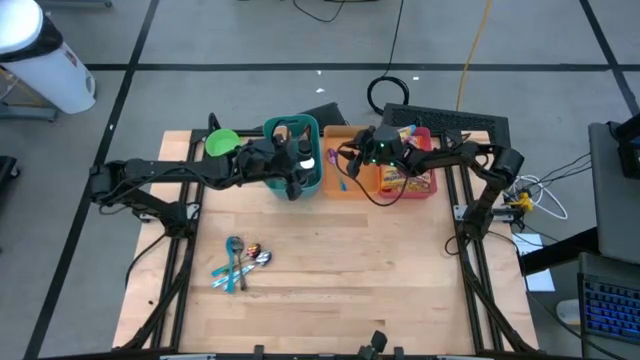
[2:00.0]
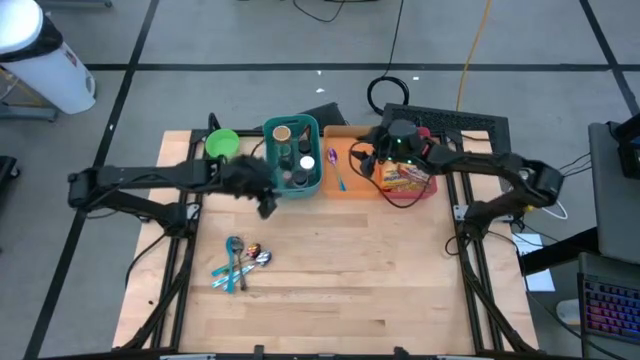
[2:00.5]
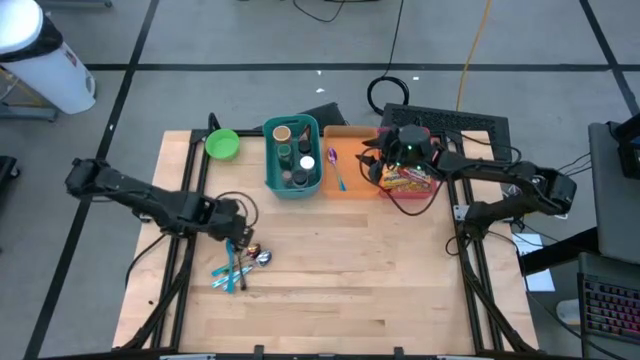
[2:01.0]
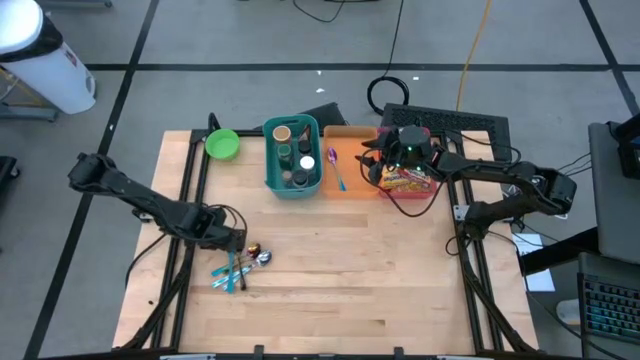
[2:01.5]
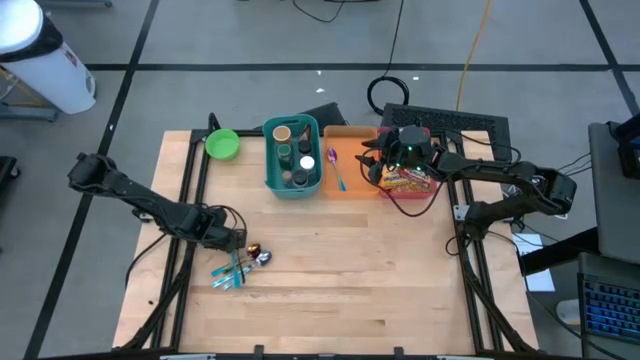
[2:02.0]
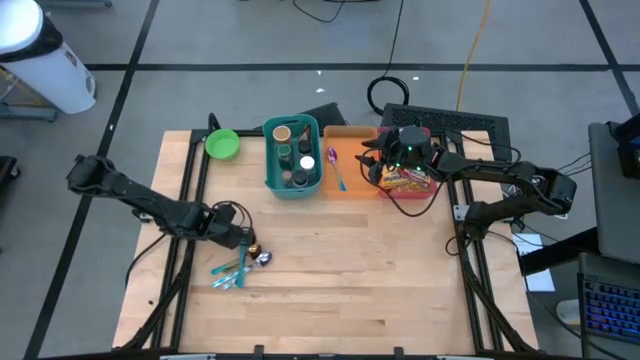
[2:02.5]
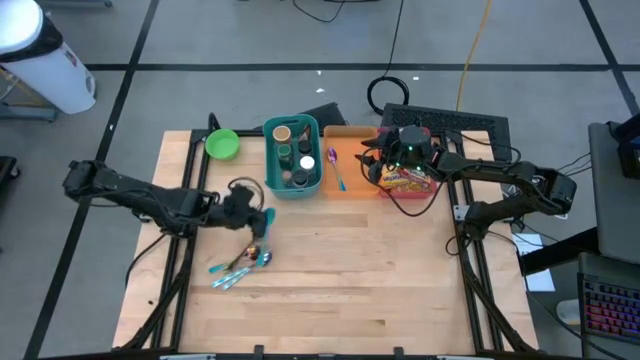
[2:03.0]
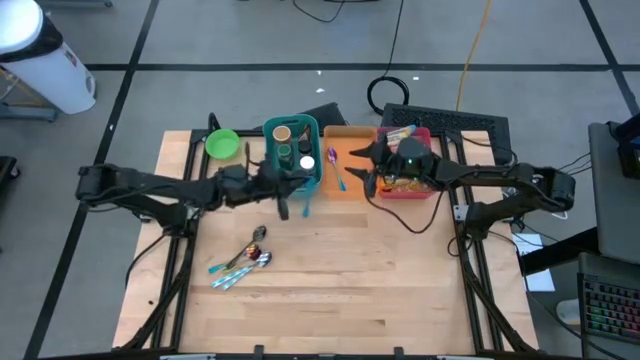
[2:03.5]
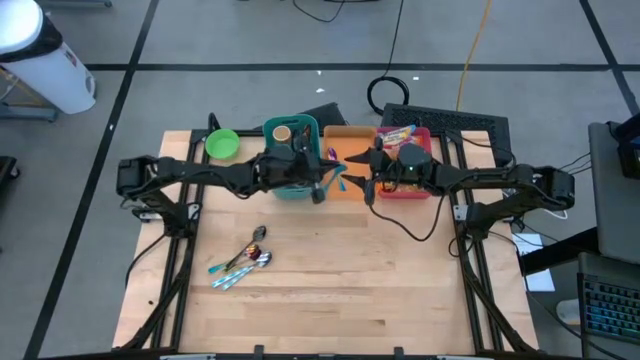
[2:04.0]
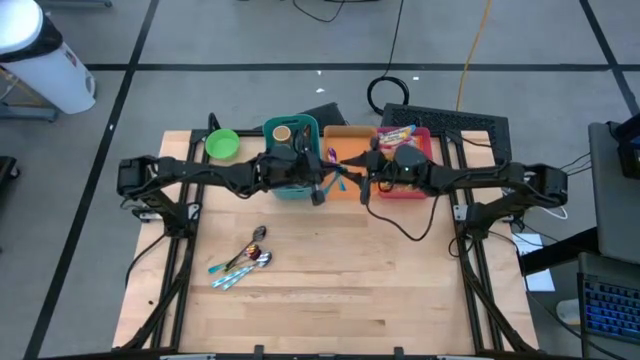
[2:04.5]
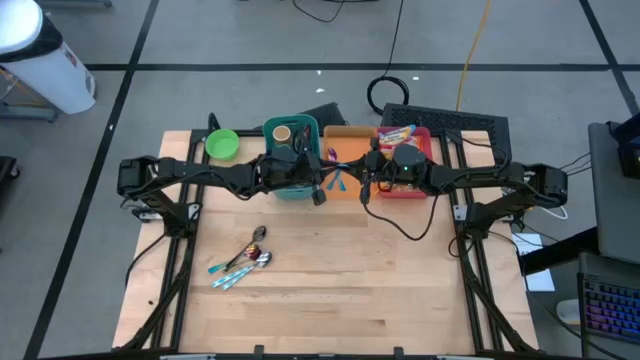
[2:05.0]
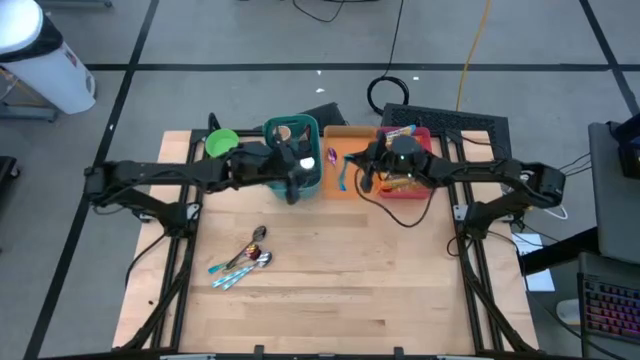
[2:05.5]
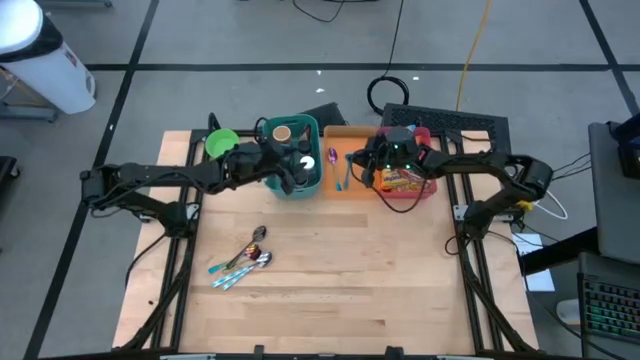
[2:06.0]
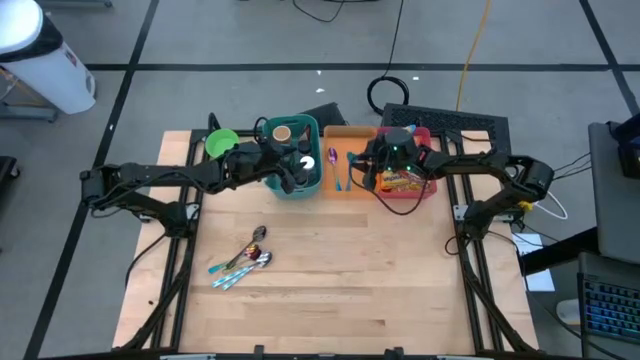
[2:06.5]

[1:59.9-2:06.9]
Task: Pick & Place Food Item
Put the blue baby spoon into the orange bin

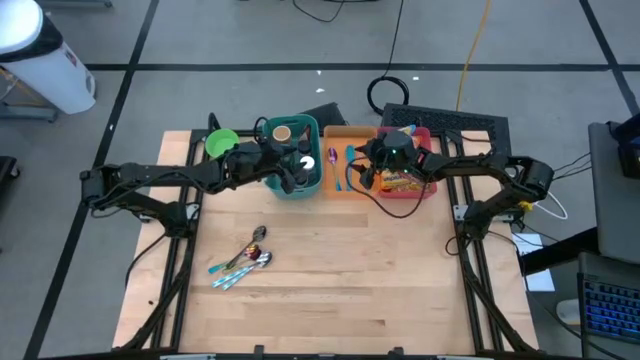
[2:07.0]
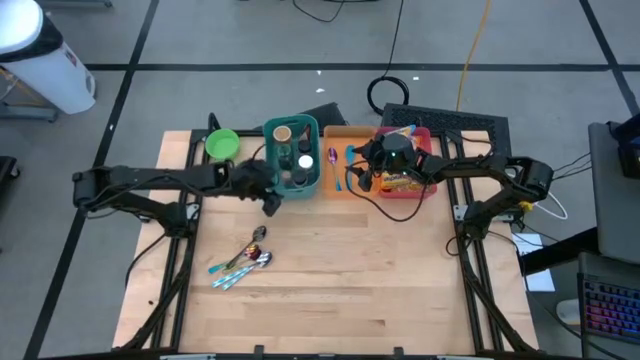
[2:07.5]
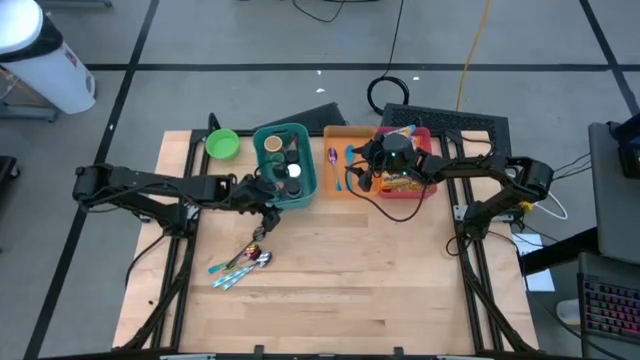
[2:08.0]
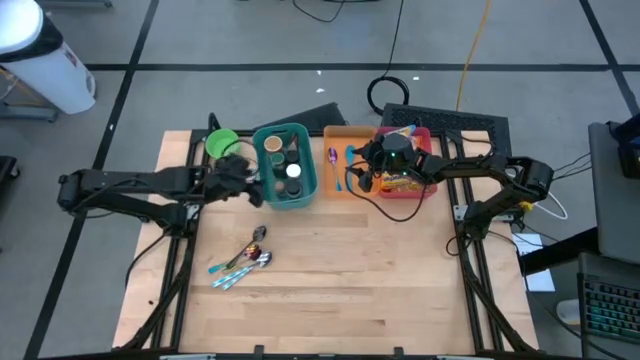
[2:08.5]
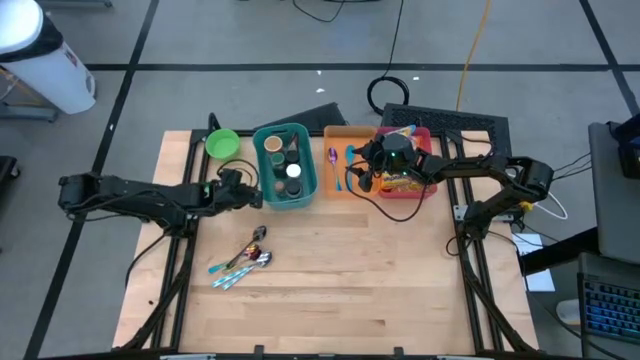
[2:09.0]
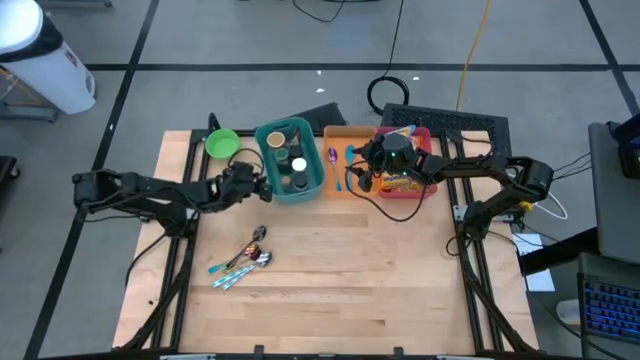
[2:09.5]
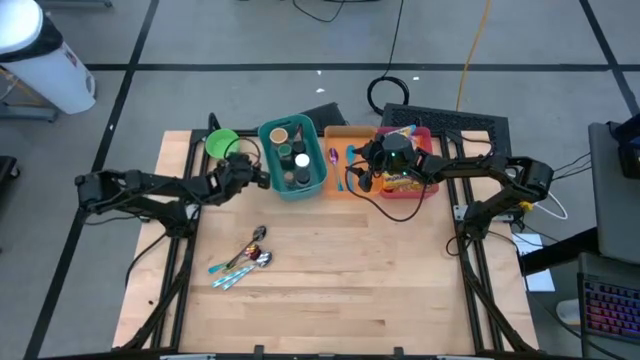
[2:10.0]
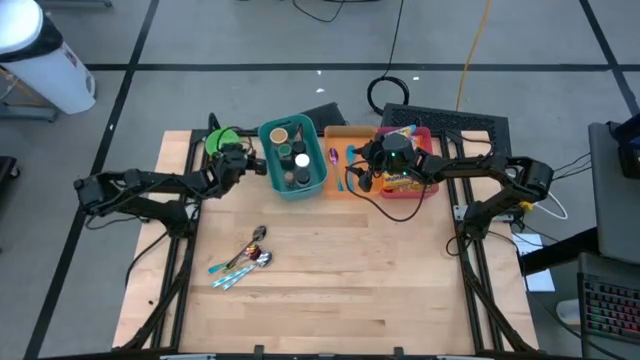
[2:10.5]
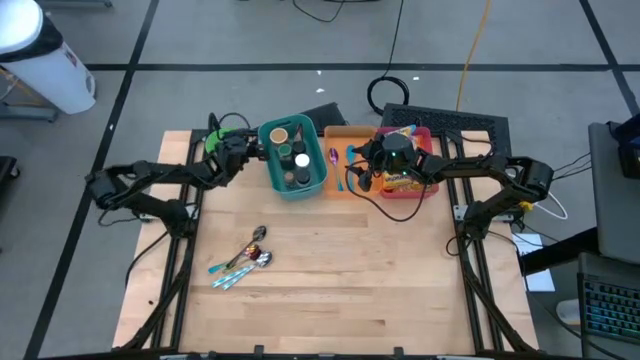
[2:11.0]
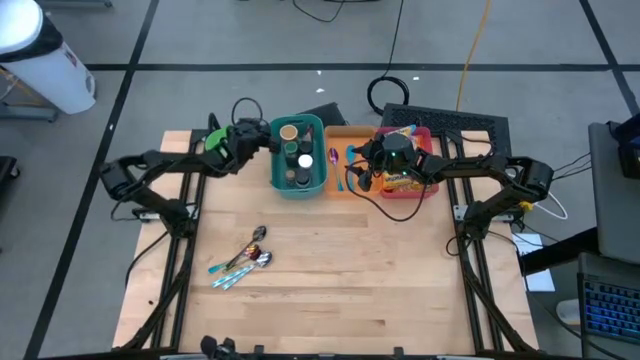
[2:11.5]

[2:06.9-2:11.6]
Adjust the green bin

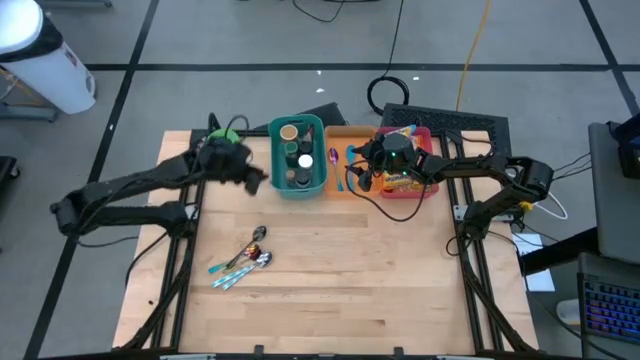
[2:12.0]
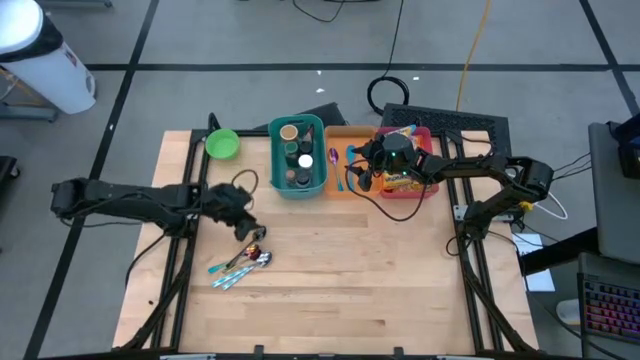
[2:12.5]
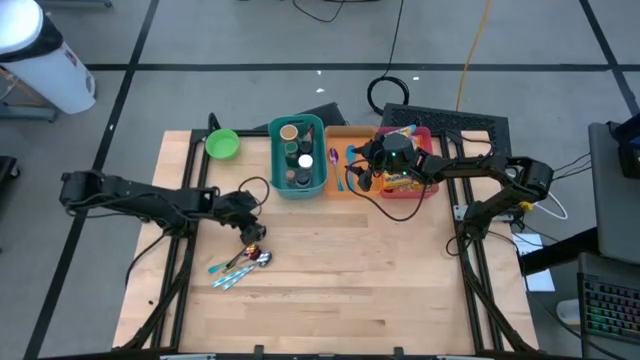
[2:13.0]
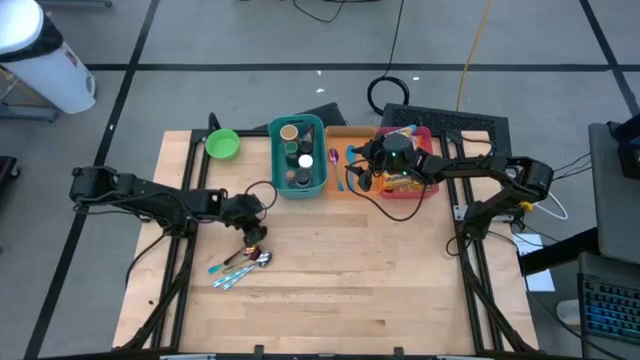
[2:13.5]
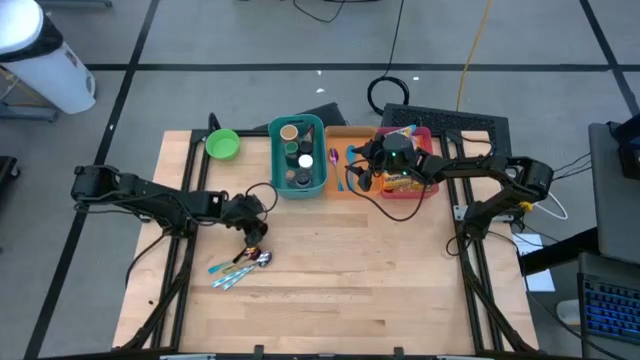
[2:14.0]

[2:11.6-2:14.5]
Put the black spoon into the orange bin

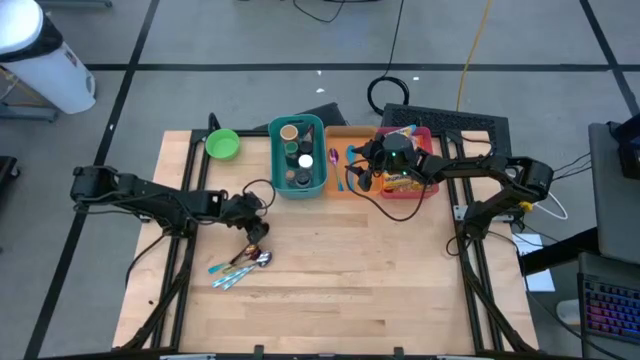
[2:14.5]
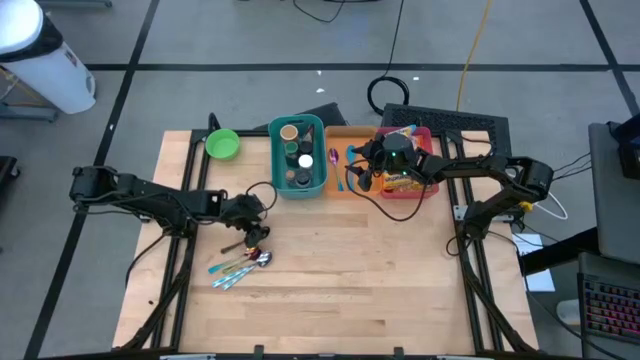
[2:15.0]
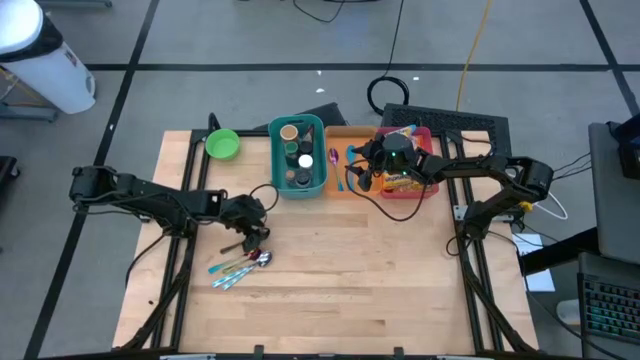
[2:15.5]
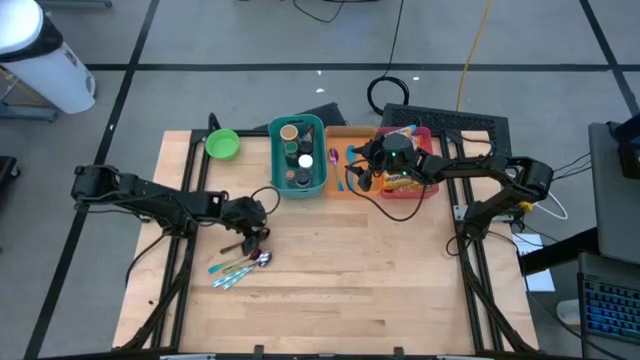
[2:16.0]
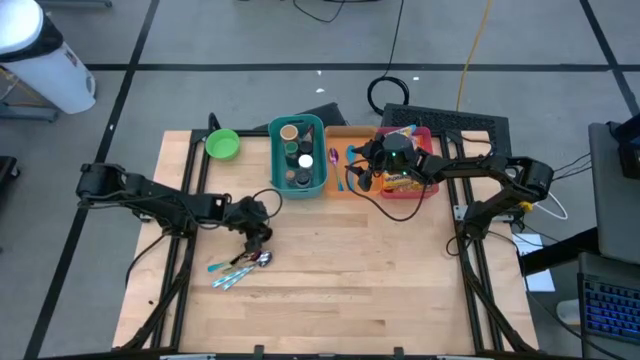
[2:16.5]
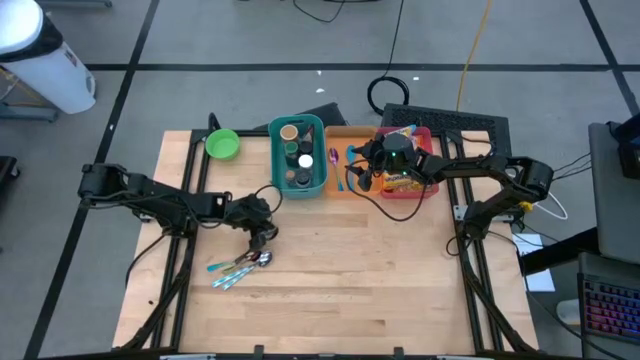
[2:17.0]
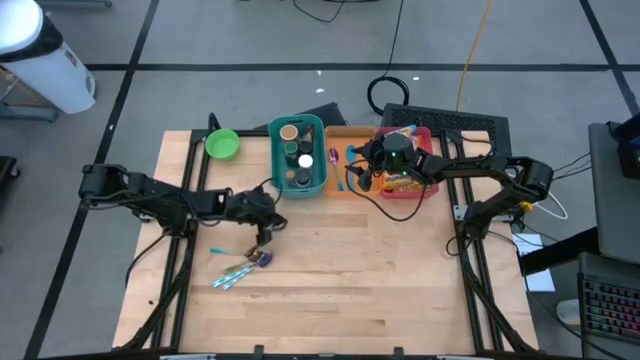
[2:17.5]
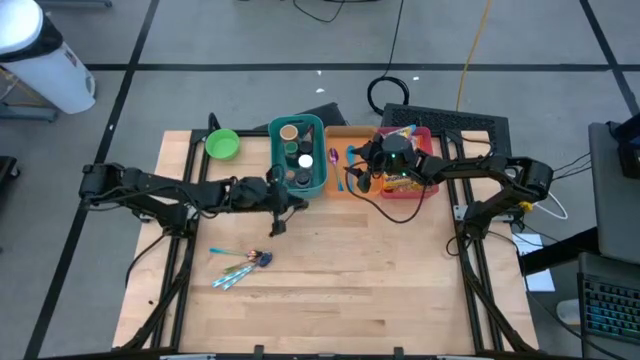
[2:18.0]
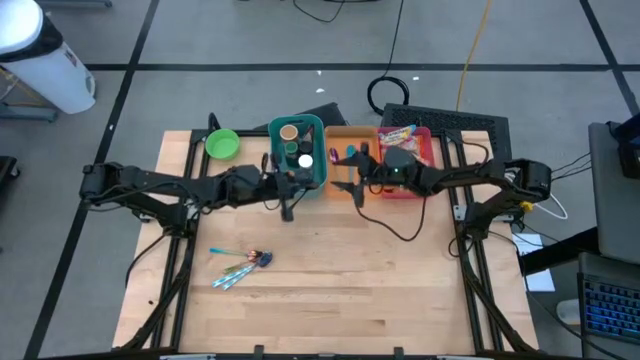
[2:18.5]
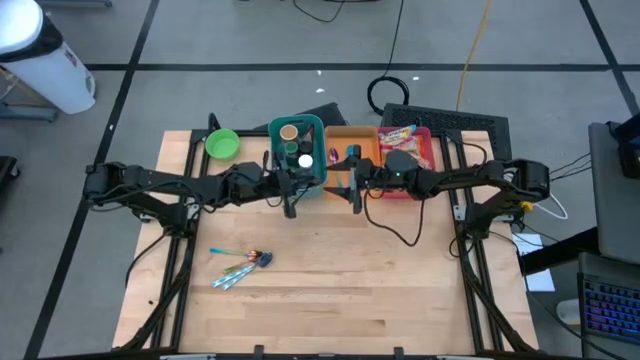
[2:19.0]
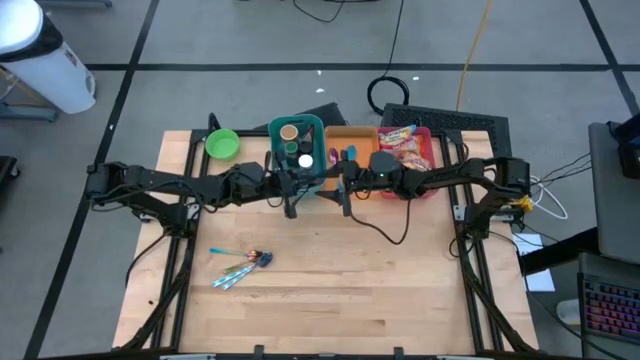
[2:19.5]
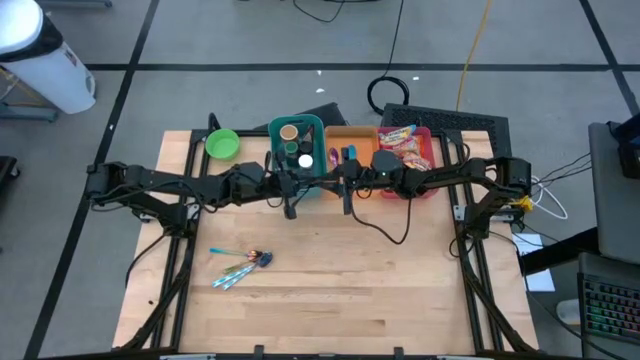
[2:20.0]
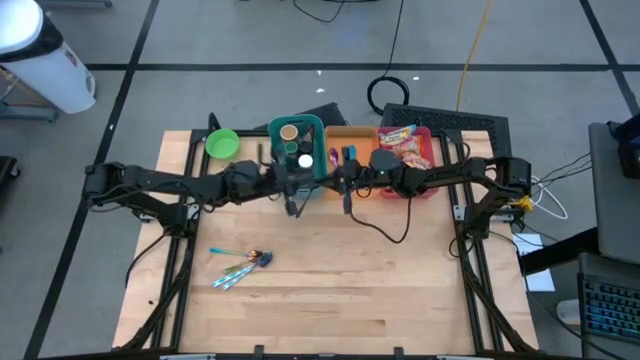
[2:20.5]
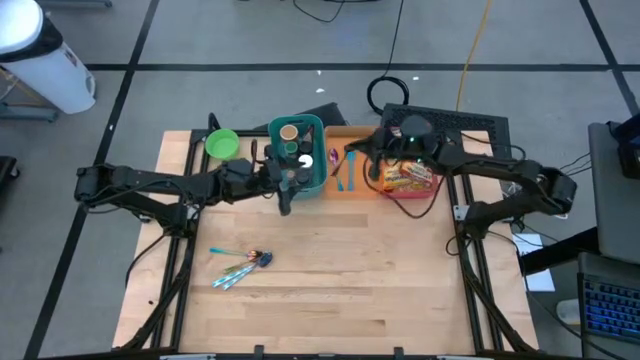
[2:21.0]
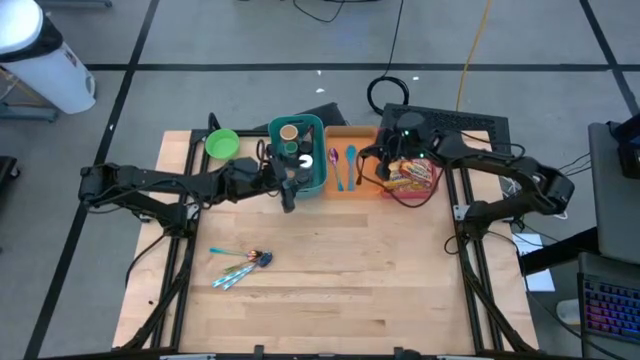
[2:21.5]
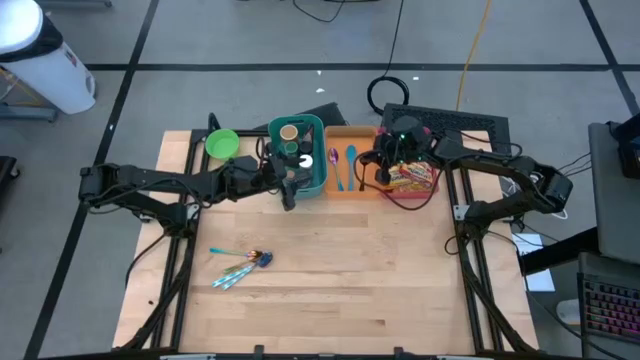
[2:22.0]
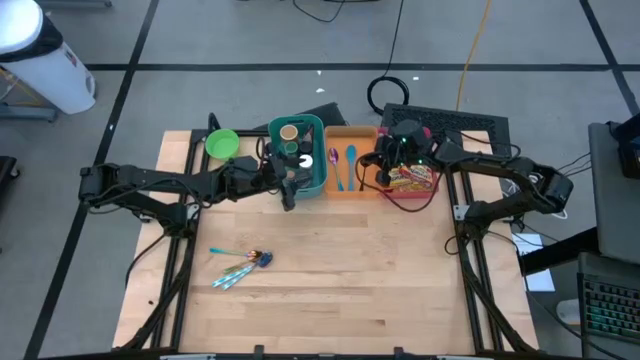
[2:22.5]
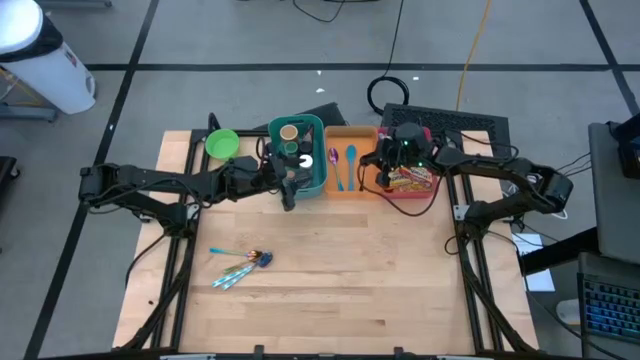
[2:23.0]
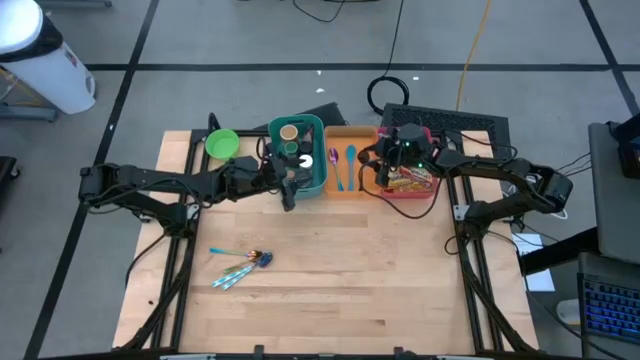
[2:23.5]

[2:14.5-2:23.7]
Put the black spoon into the orange bin
